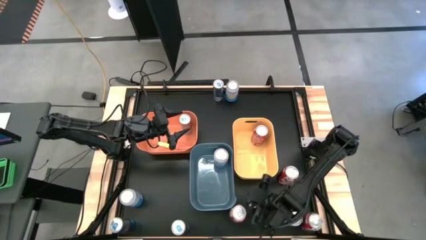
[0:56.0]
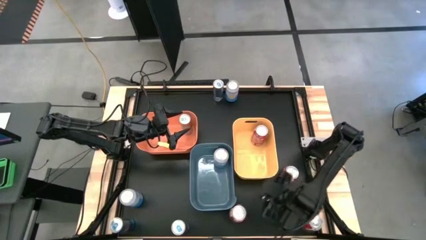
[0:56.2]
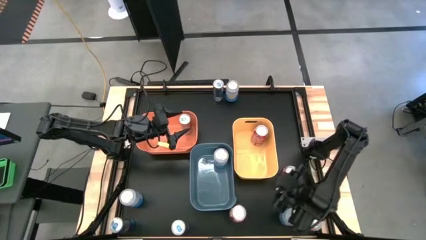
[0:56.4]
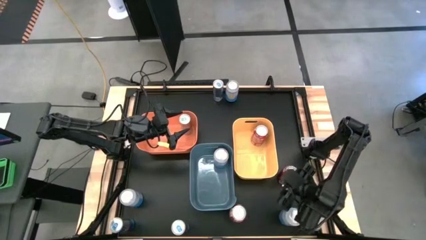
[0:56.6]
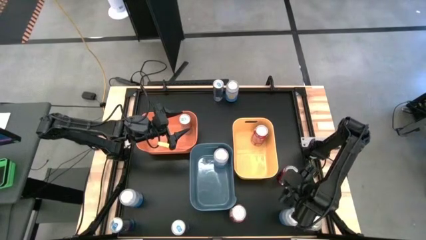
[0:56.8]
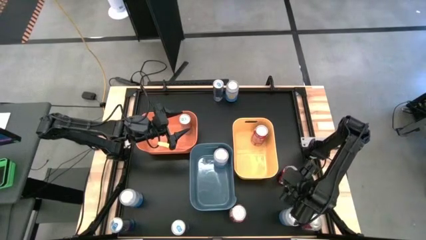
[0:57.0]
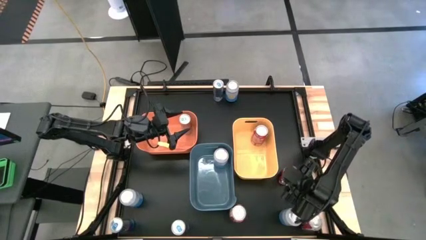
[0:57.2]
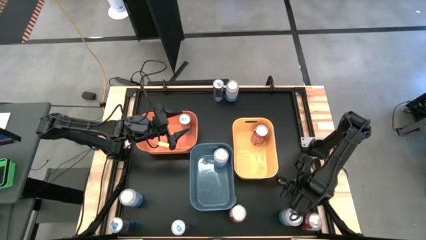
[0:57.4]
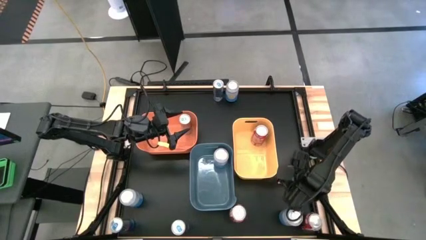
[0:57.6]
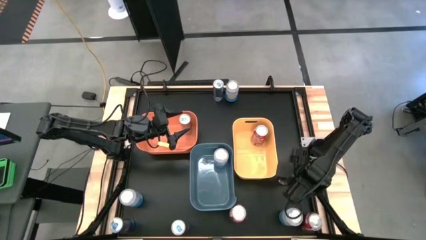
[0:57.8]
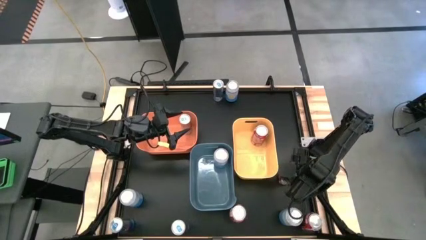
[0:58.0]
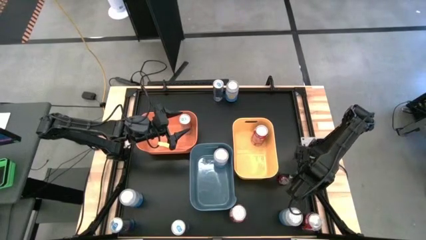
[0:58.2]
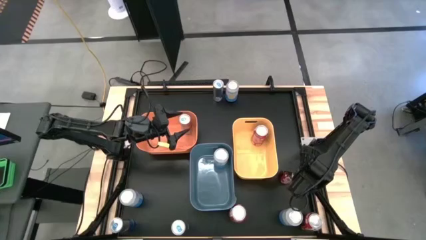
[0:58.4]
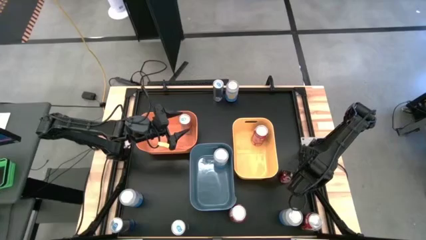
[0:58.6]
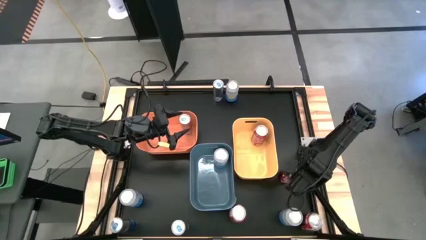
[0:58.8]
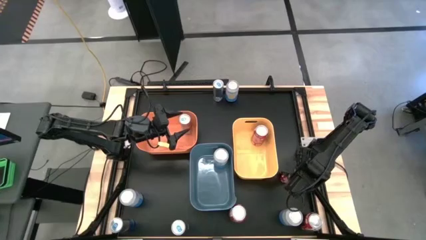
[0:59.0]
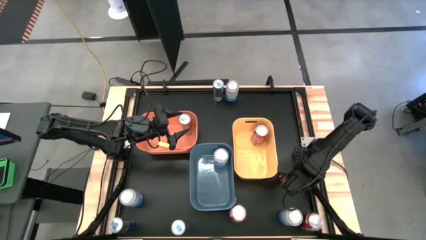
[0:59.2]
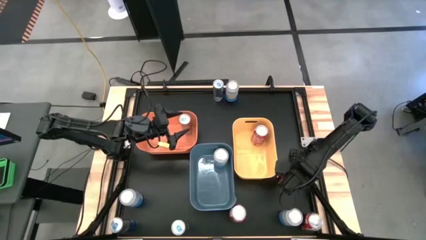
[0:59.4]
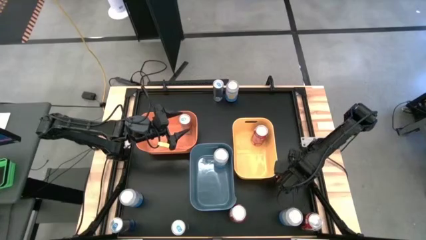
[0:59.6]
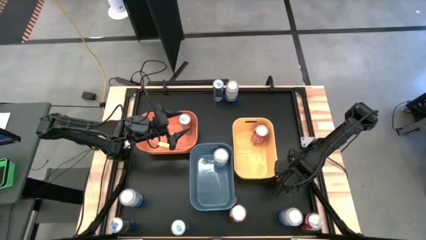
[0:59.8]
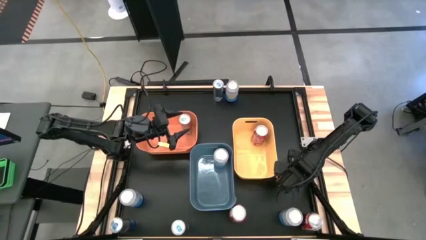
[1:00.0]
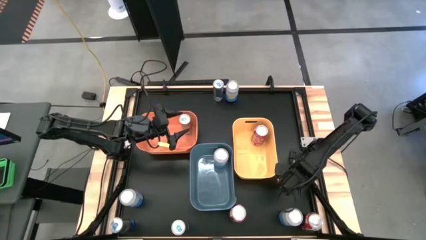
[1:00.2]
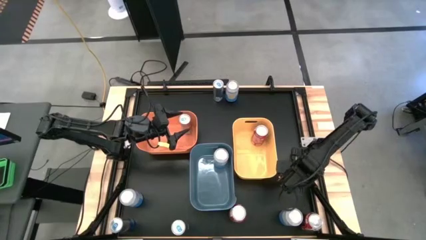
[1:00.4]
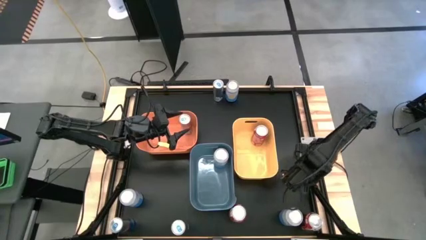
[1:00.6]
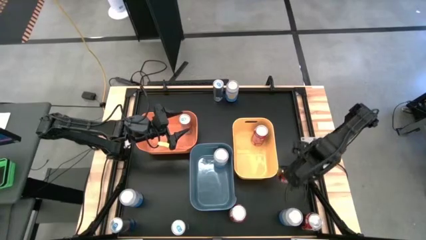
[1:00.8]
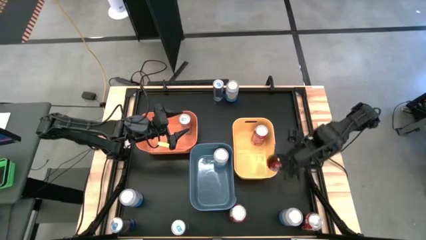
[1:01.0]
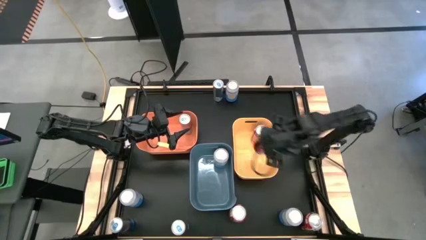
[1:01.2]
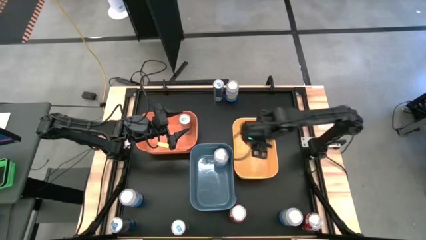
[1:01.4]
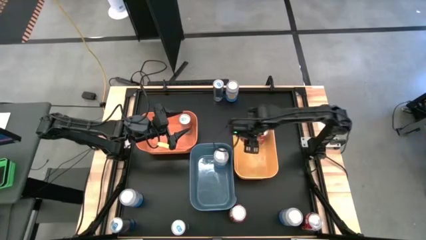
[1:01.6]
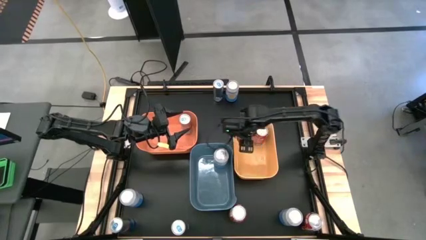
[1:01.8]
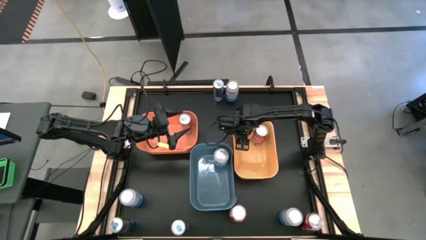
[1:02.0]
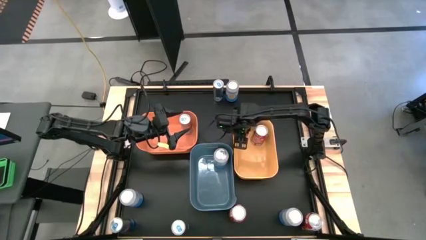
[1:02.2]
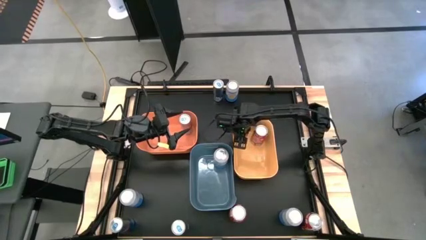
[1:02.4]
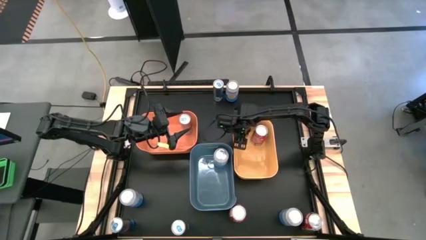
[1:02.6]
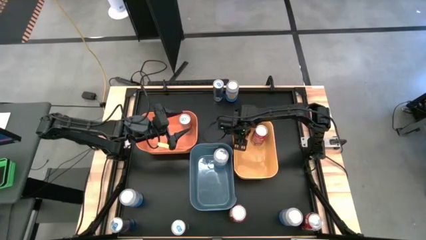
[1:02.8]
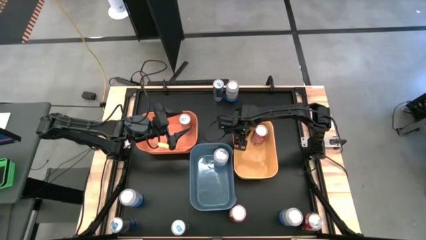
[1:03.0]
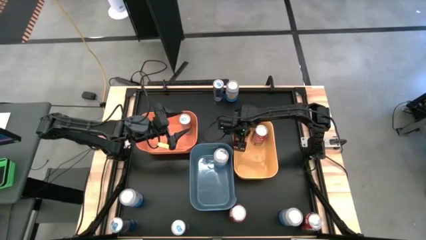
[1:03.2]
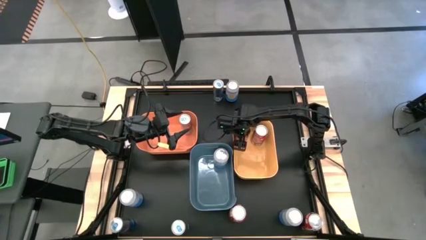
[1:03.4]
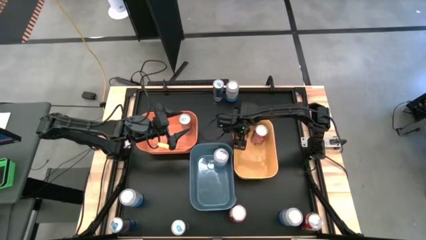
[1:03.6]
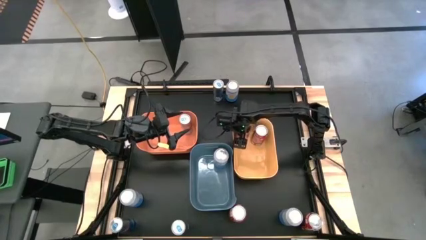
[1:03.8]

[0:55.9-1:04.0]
Task: Sort soda cans
Put the top red-white soda can into the yellow bin

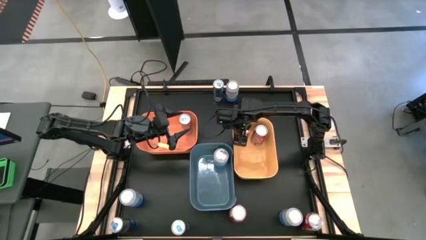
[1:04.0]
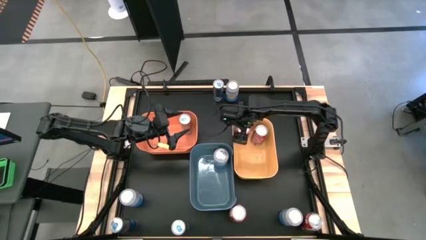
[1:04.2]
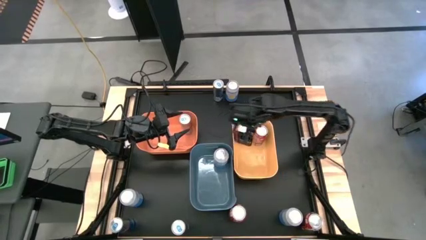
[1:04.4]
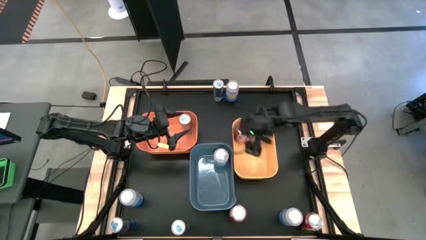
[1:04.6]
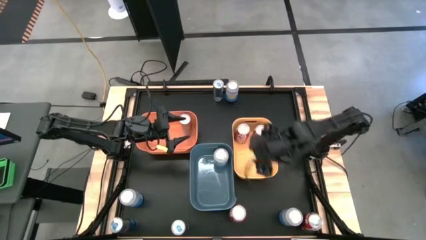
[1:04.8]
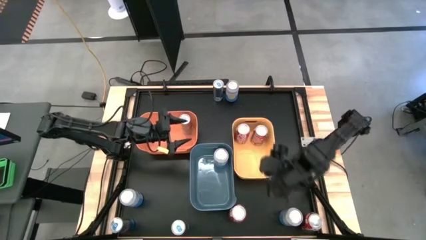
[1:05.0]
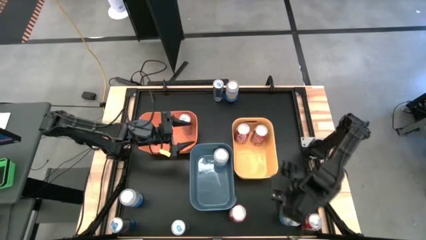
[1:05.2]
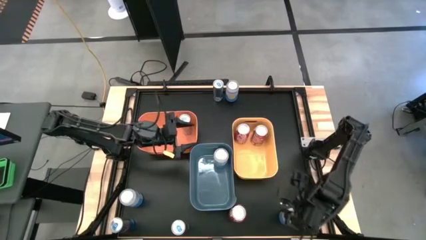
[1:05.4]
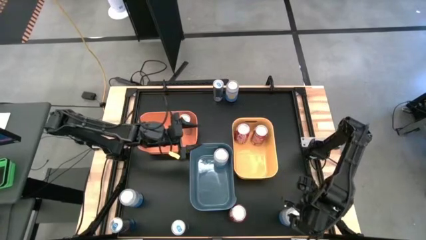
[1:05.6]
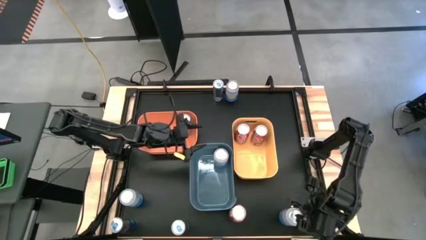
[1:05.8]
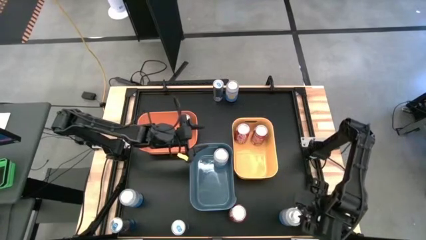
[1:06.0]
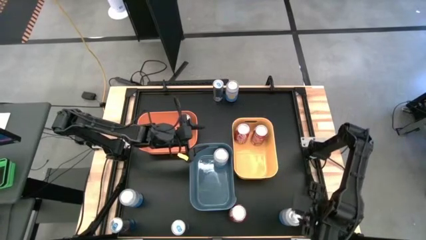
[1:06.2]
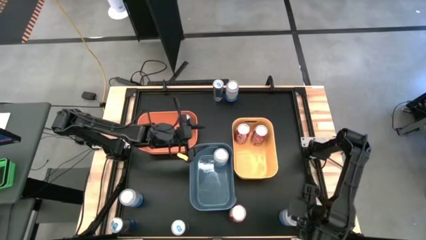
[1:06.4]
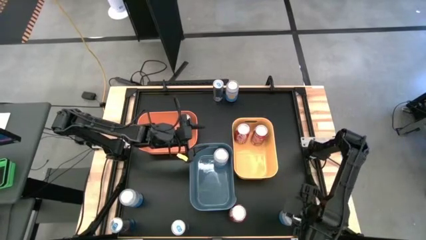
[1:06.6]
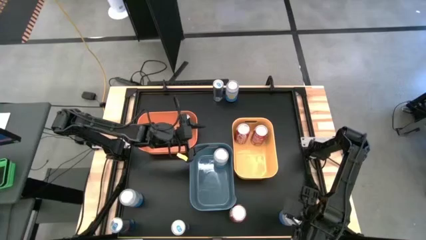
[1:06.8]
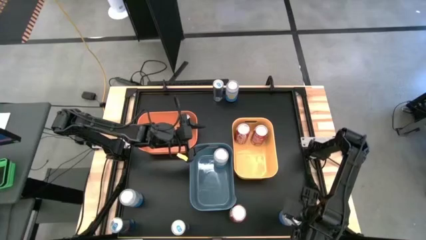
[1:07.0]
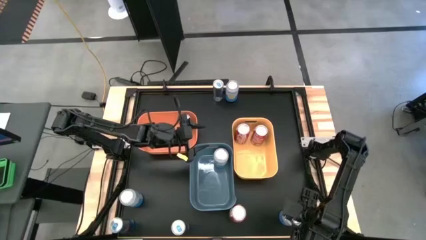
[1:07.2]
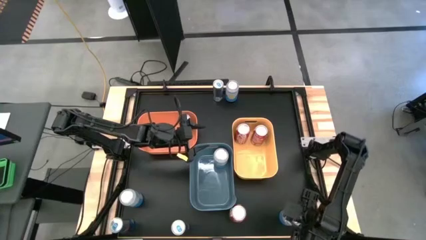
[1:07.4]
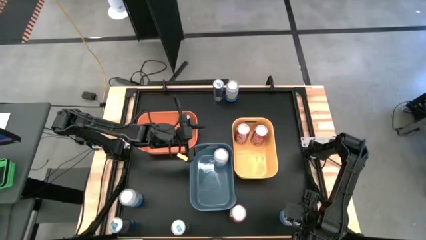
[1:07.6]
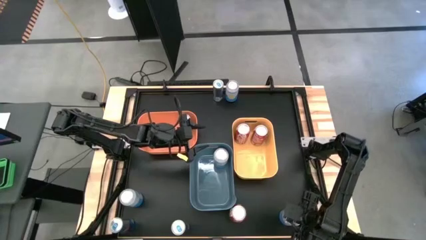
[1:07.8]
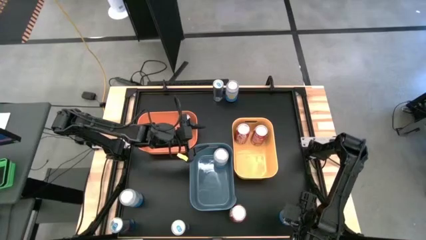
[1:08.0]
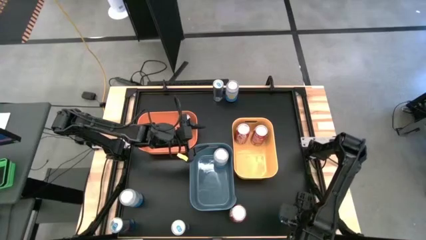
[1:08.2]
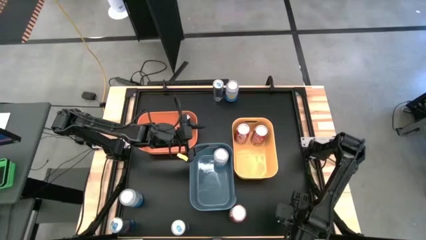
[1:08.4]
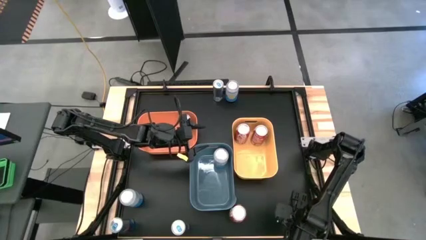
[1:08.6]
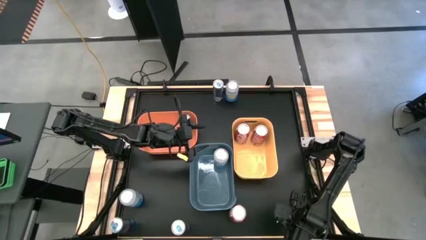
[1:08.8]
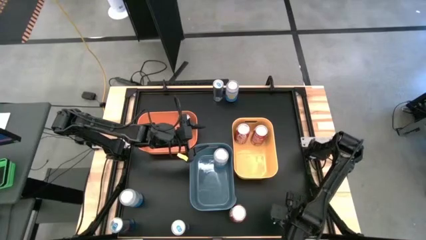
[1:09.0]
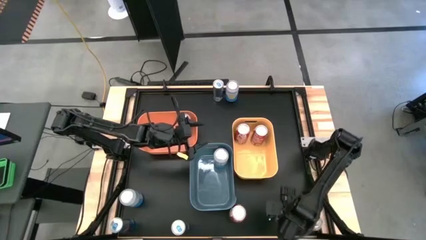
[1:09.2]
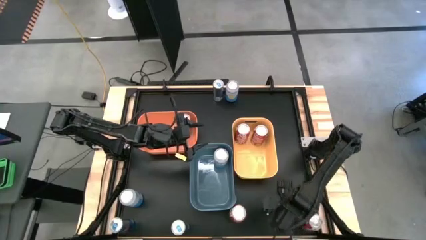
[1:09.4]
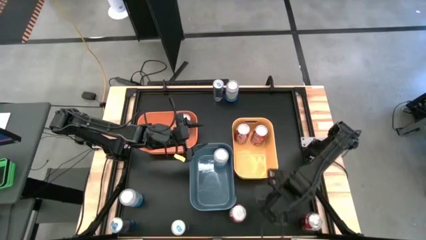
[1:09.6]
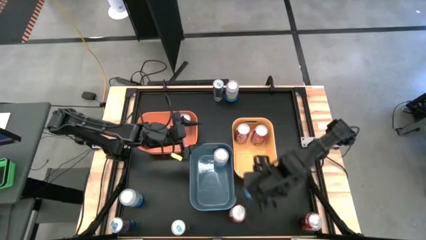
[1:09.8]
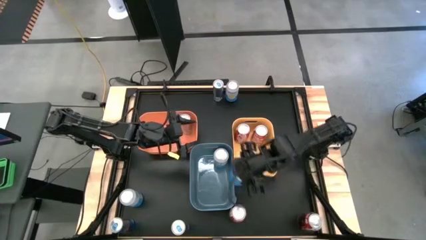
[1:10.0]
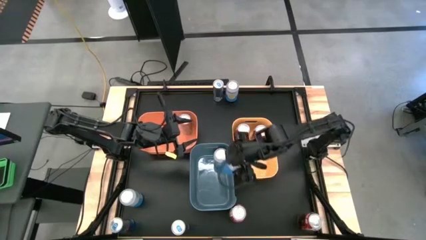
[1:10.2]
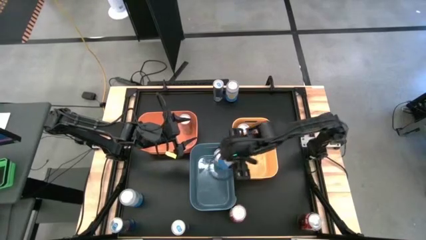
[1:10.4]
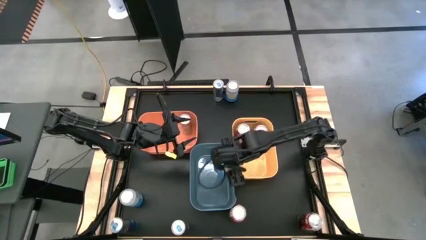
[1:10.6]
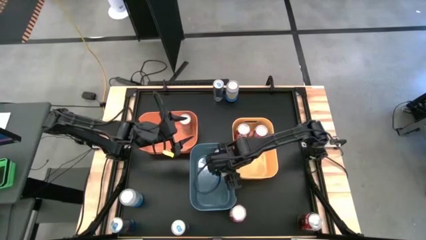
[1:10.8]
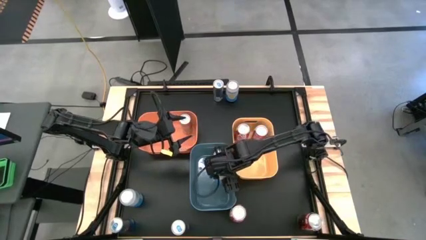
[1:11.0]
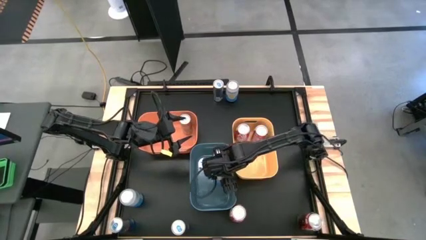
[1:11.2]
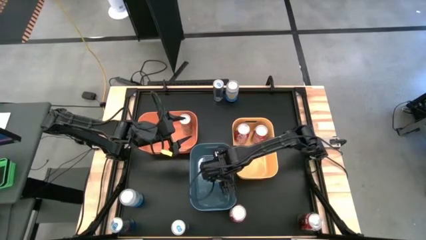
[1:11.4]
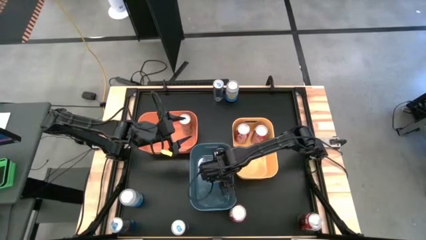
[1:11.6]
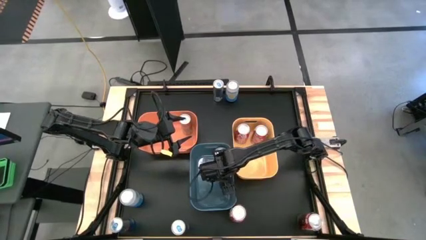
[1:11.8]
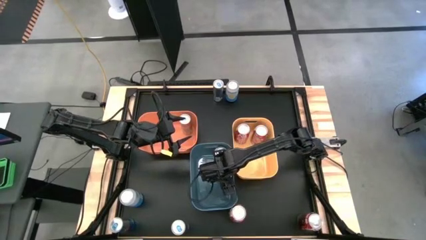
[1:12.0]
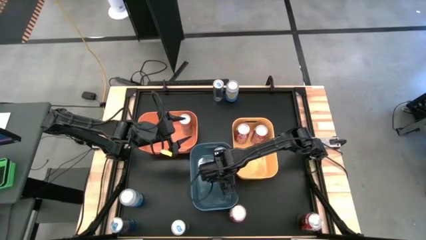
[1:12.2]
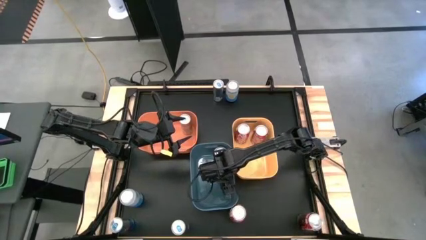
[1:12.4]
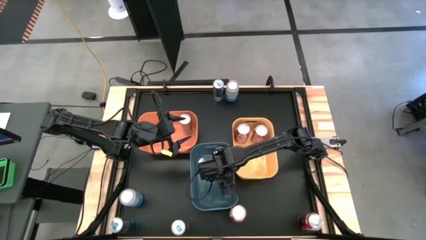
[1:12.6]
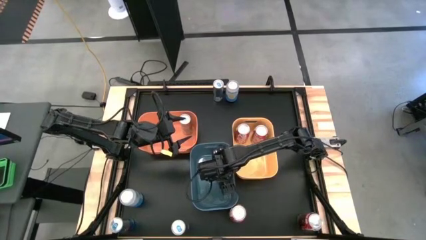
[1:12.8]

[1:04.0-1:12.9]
Put the bottom right blue-white soda can into the blue bin
